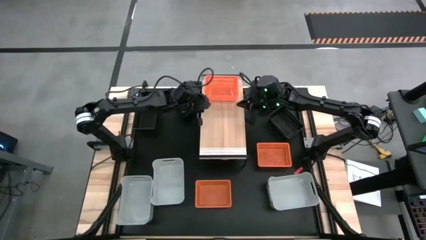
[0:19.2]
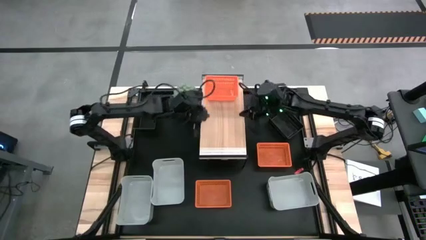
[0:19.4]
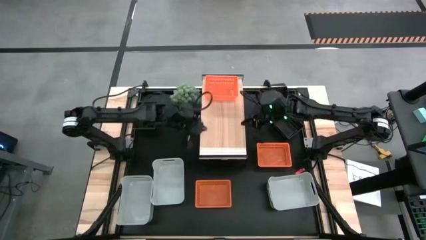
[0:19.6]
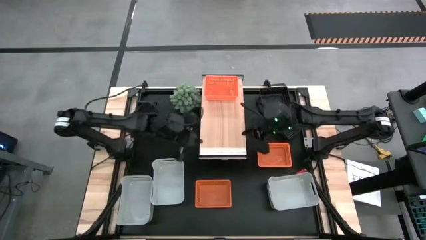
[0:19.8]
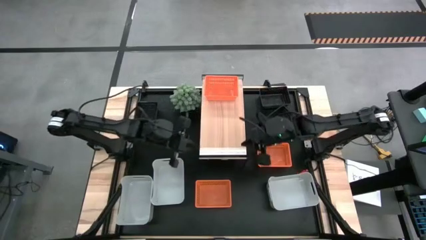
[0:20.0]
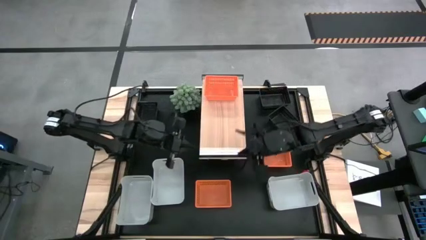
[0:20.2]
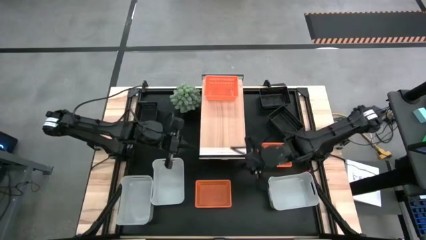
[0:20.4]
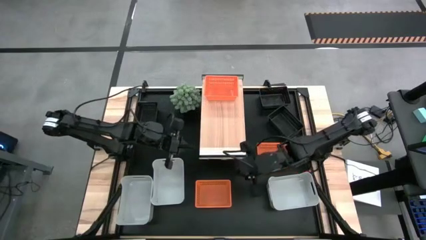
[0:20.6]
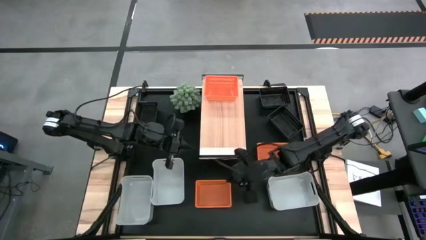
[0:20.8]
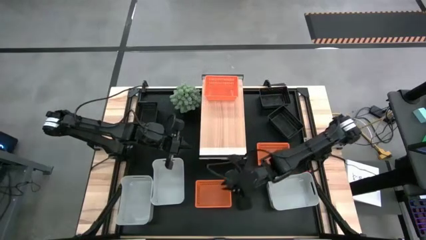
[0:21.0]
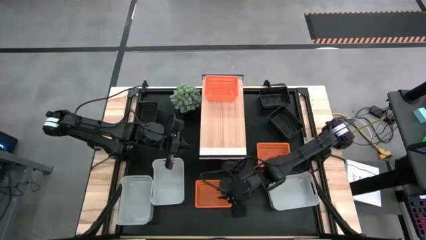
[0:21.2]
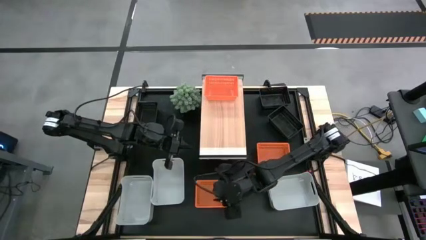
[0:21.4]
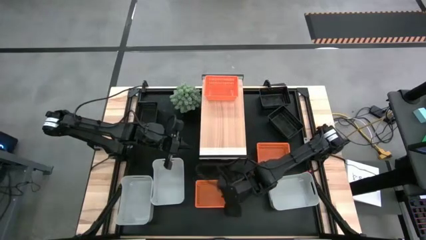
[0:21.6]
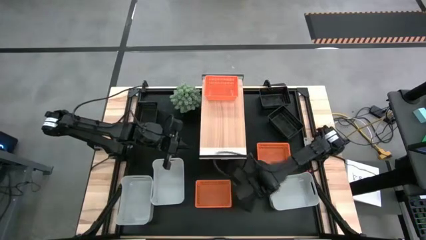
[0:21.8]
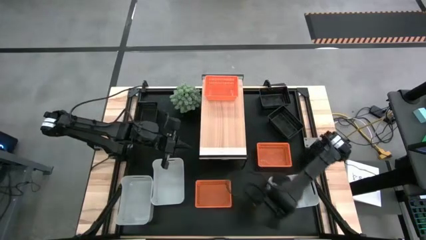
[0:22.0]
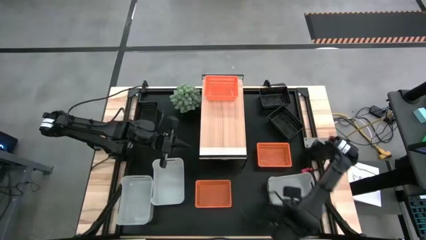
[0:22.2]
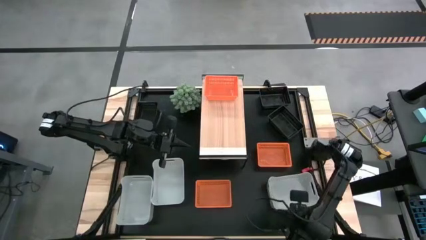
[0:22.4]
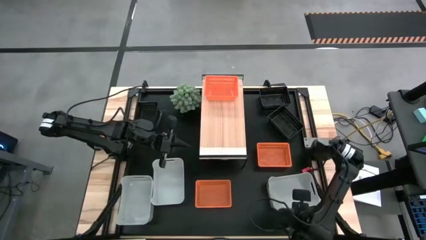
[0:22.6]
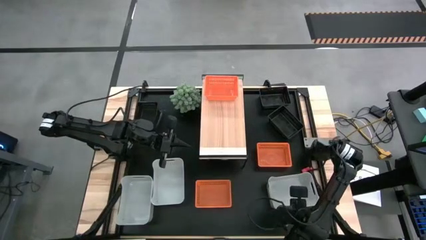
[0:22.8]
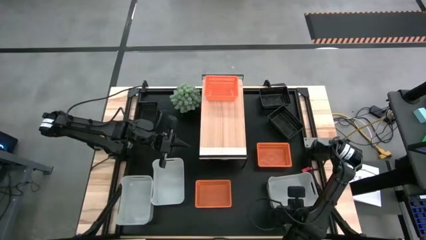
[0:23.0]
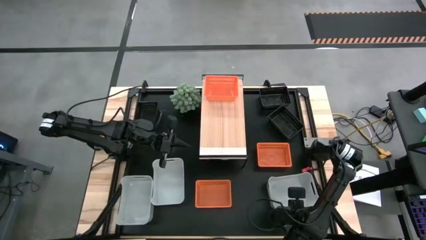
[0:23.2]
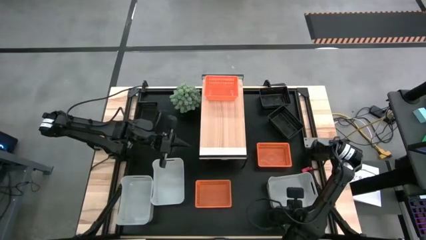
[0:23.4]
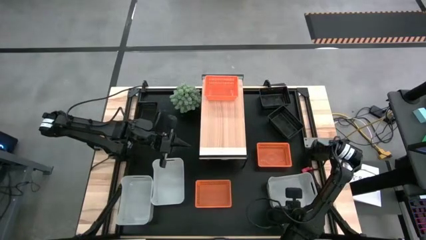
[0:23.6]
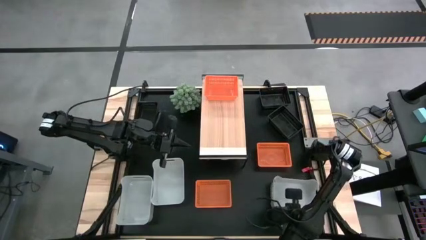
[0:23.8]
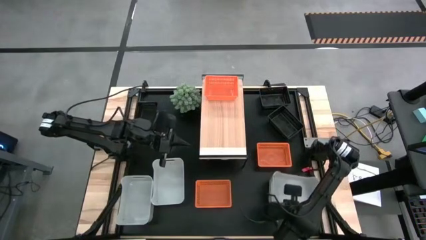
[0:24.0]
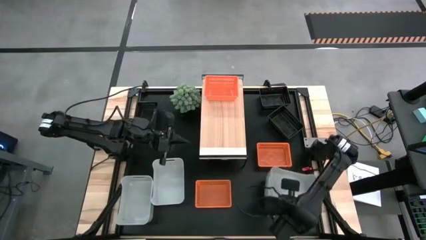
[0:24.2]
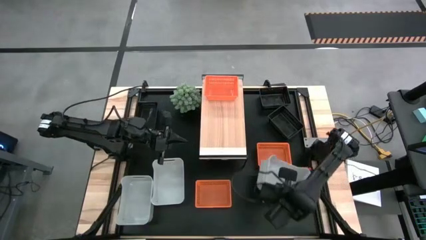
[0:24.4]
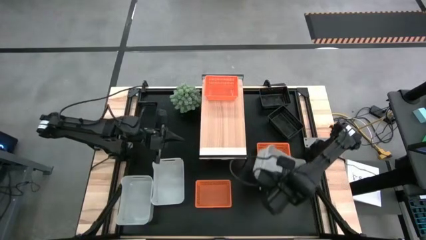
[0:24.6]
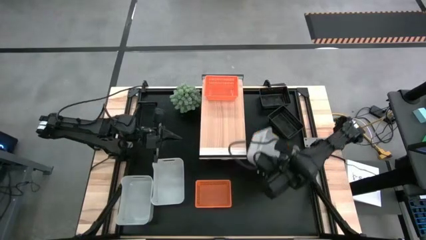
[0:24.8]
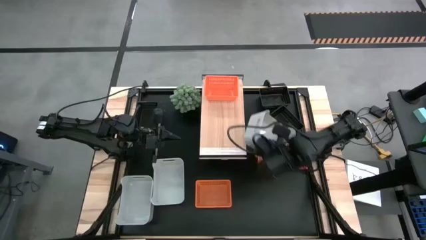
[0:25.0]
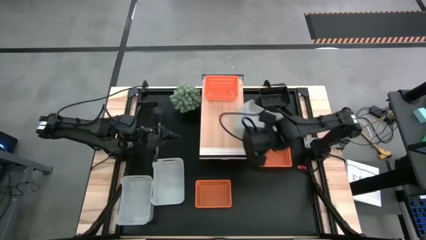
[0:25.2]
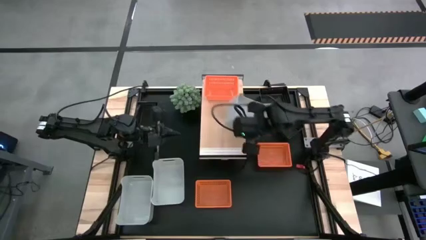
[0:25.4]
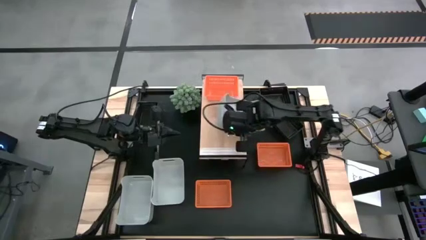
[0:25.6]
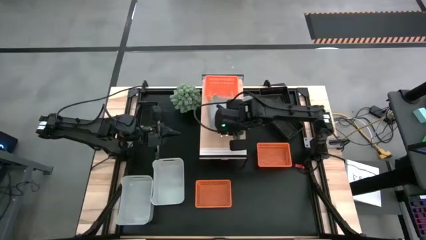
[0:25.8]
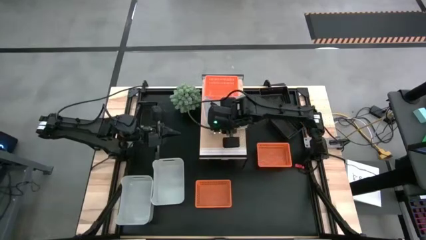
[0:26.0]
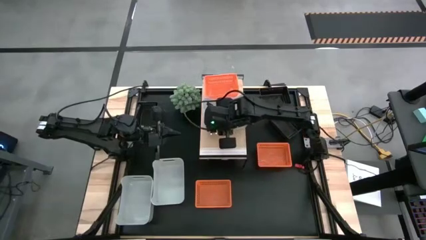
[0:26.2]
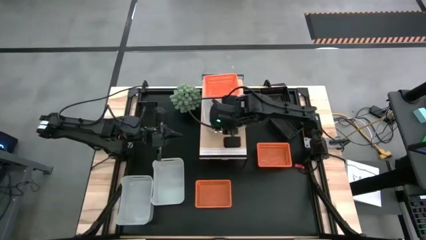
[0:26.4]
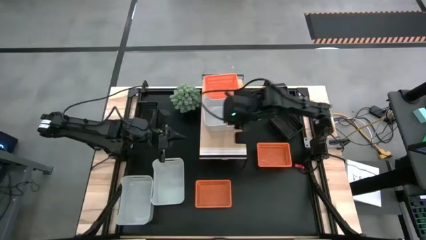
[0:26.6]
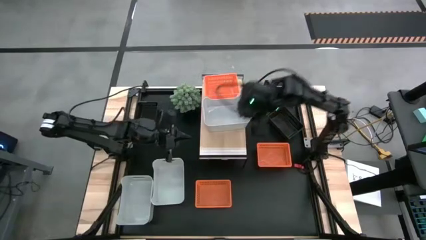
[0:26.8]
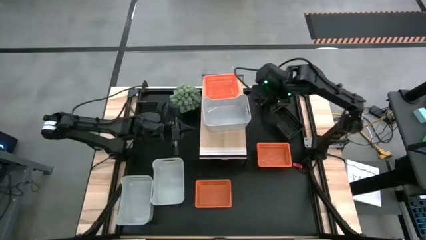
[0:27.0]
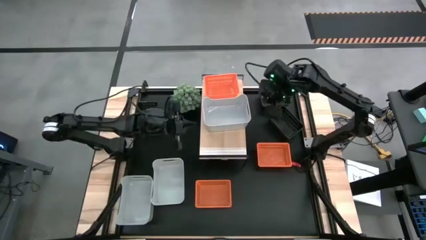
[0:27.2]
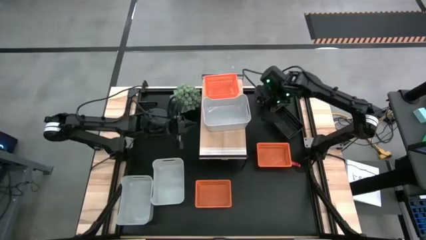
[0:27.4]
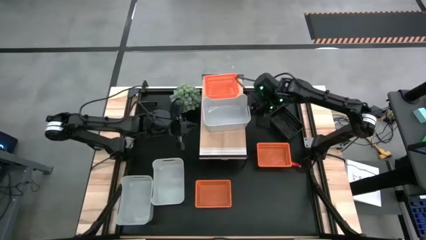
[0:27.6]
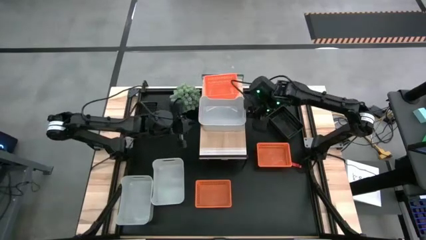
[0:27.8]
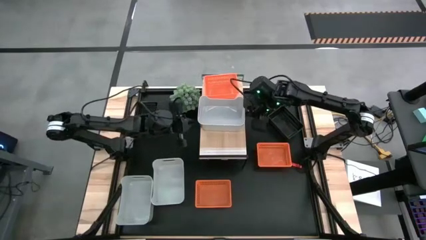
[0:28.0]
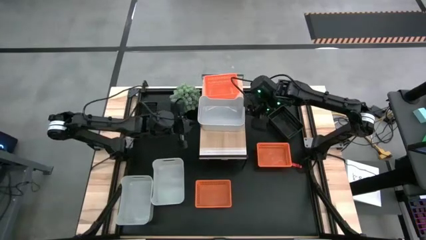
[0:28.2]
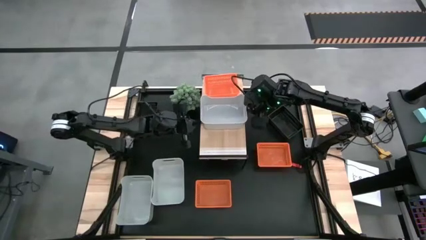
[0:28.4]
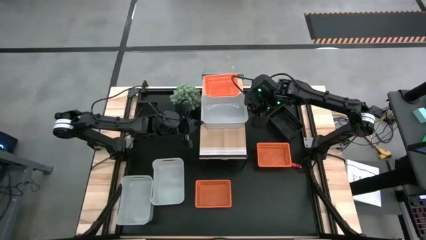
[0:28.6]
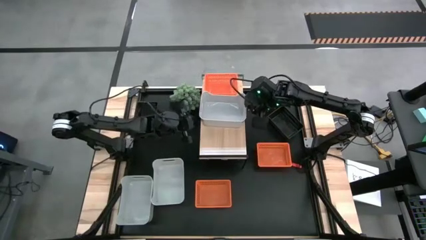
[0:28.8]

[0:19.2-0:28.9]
Task: Stack baskets on shelf by color
Put the right gray bin on the shelf

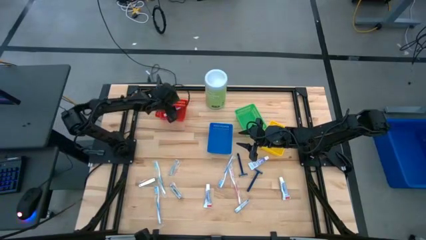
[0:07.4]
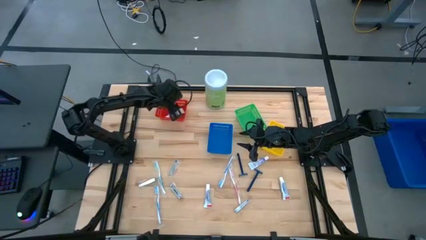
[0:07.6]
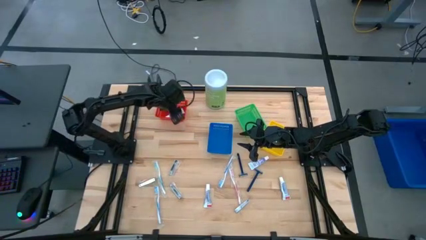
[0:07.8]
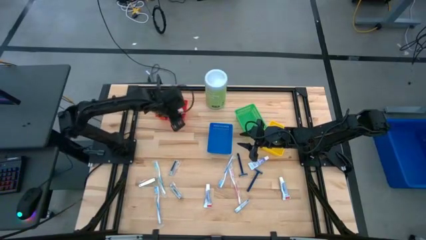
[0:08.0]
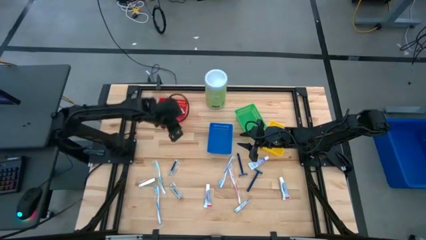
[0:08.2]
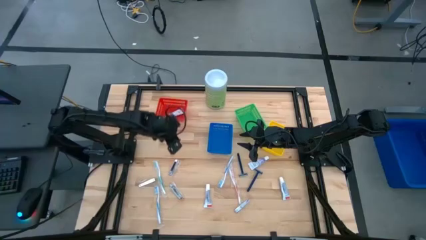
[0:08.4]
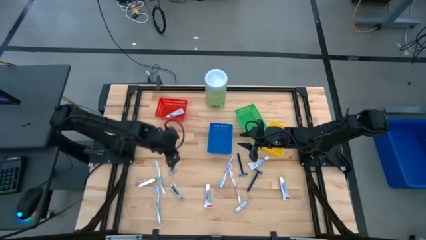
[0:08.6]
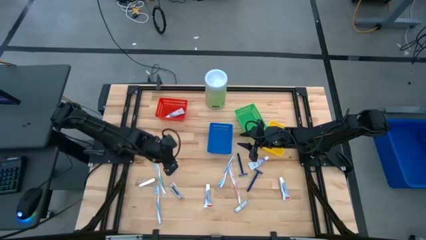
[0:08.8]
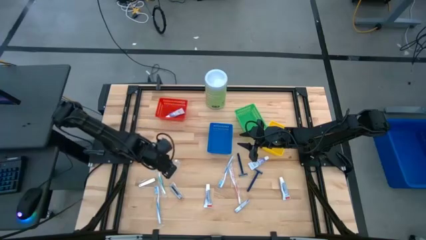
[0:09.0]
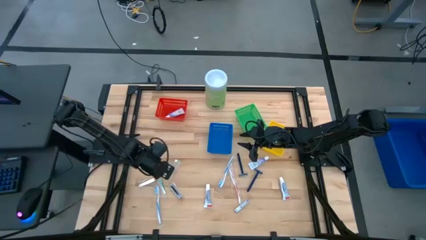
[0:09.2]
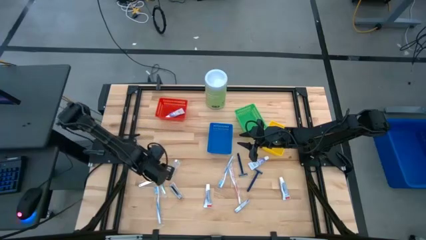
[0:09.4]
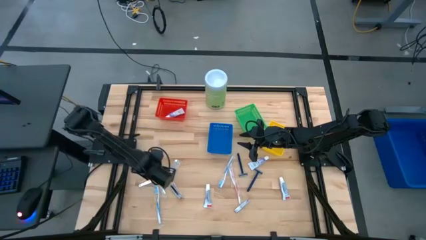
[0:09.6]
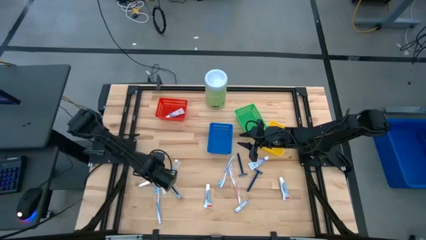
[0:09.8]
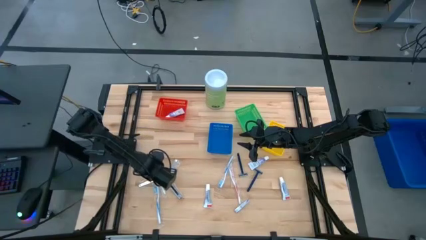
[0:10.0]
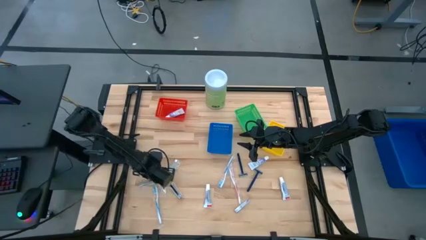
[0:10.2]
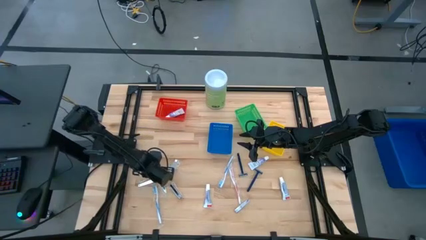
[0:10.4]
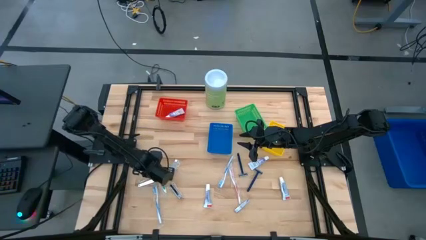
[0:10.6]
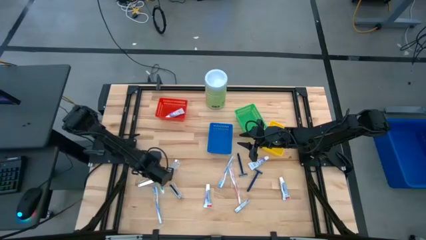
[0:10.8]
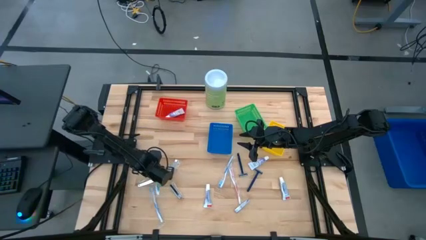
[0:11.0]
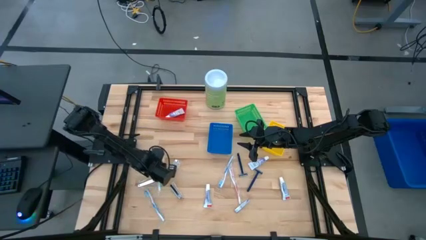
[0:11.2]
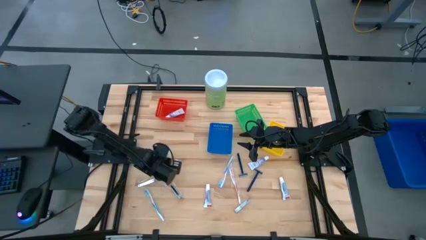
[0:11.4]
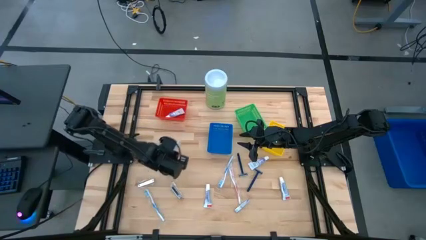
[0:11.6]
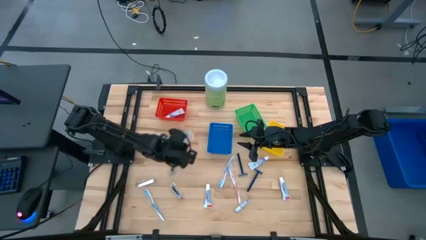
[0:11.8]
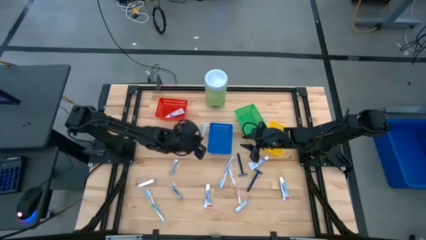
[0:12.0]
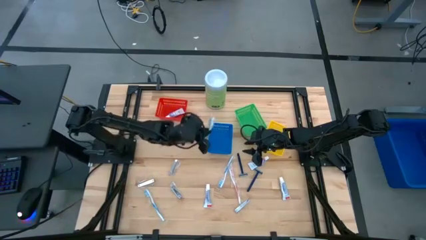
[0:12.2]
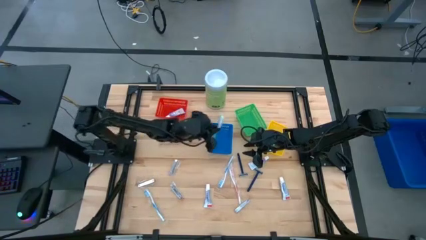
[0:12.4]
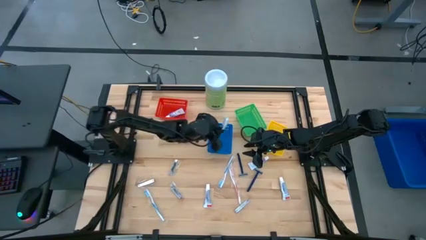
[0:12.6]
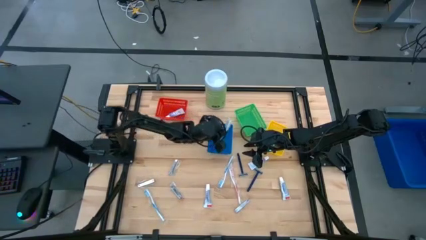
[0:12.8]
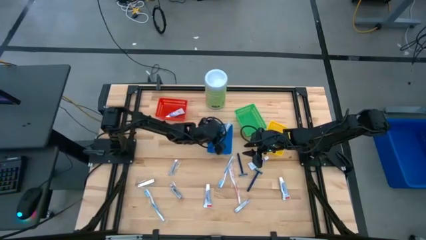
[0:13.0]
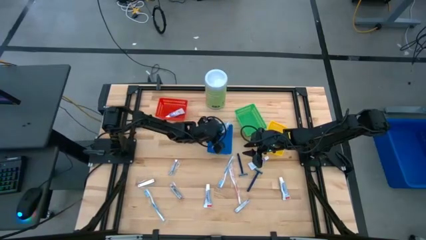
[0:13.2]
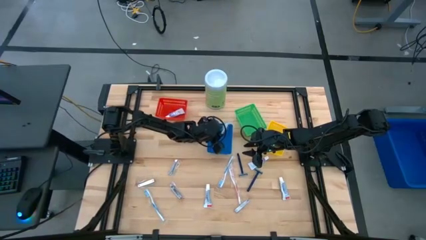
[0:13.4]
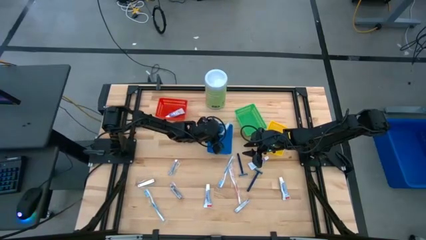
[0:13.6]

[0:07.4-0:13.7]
Task: Pick & Place Travel size toiletries
Put the green toothbrush into the blue bin

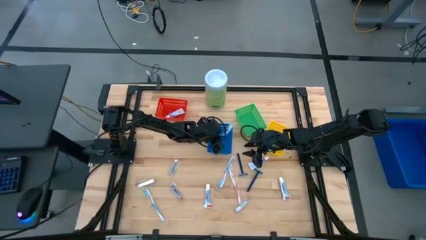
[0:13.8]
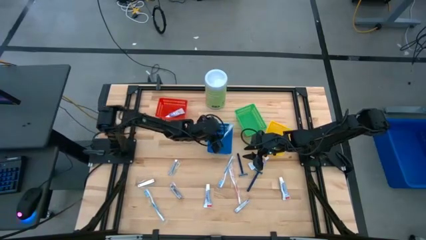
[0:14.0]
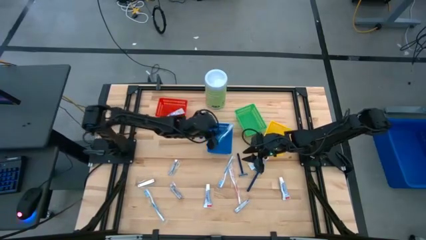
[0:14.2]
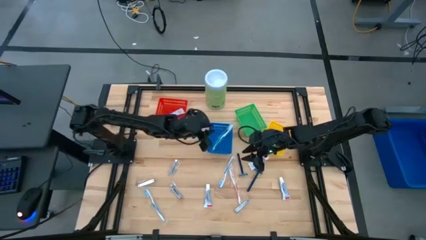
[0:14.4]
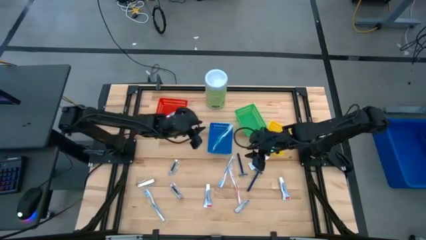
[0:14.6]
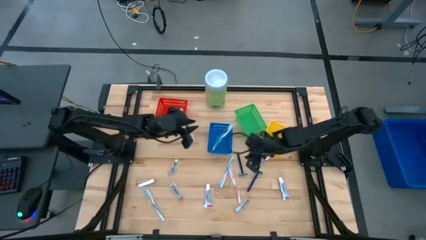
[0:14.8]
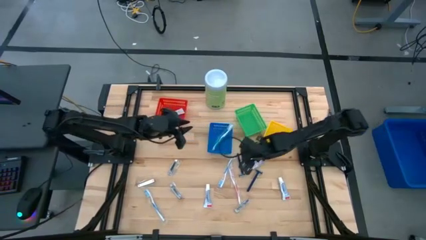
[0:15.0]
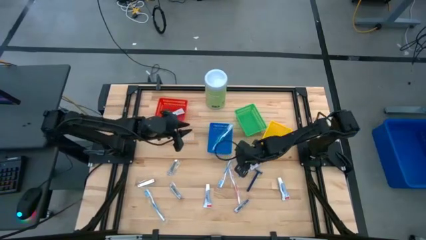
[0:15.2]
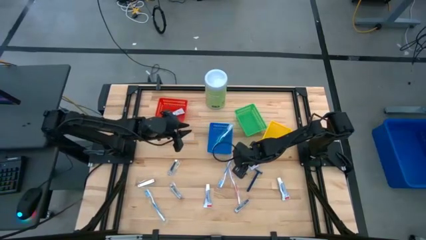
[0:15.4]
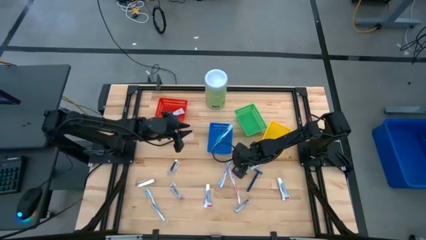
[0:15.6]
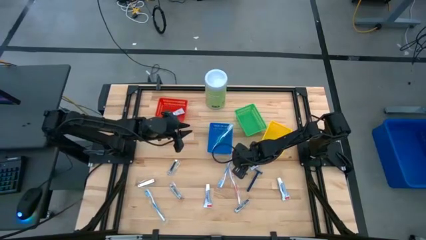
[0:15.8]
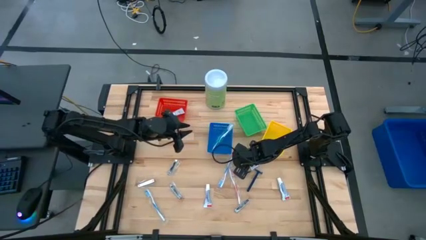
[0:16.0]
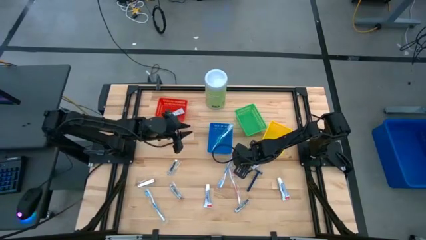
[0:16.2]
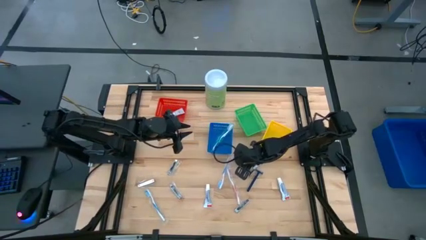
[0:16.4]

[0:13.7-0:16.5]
Put the blue razor into the green bin
